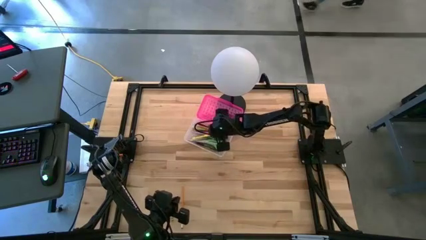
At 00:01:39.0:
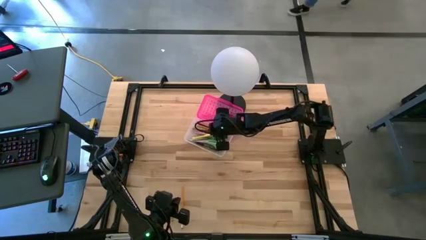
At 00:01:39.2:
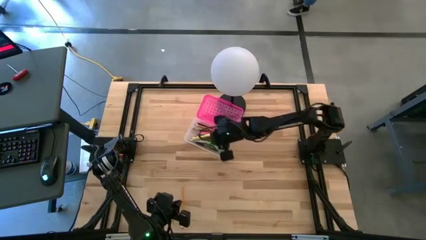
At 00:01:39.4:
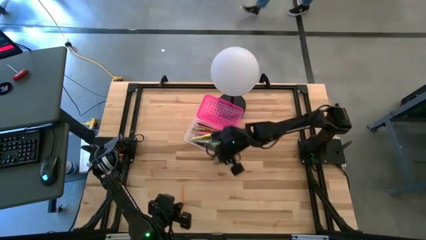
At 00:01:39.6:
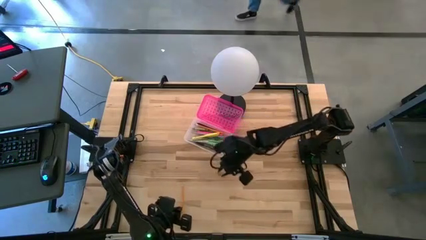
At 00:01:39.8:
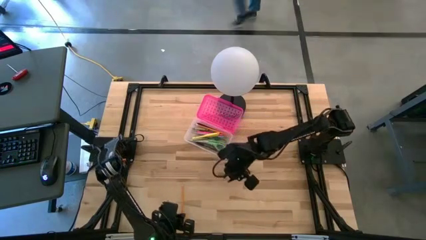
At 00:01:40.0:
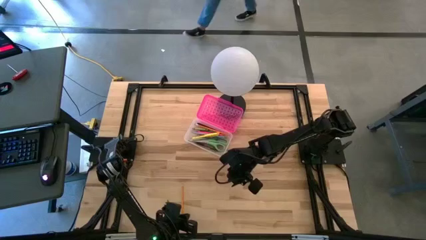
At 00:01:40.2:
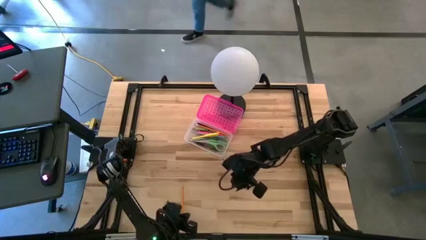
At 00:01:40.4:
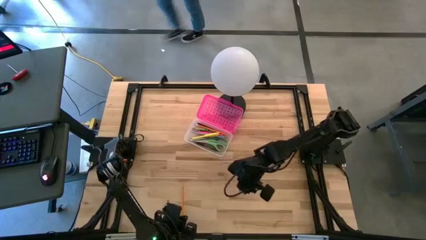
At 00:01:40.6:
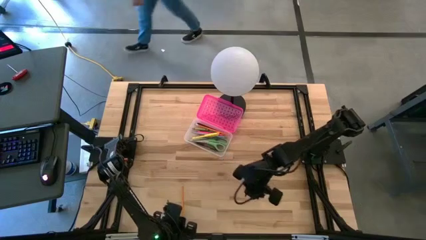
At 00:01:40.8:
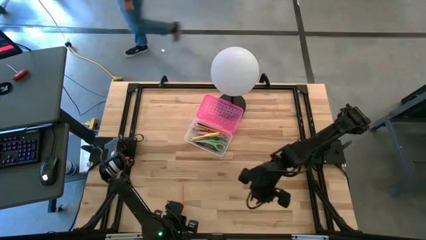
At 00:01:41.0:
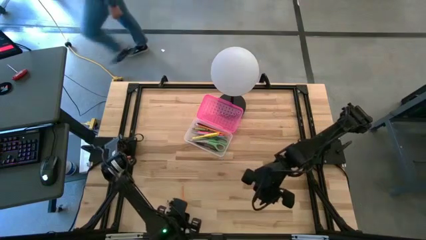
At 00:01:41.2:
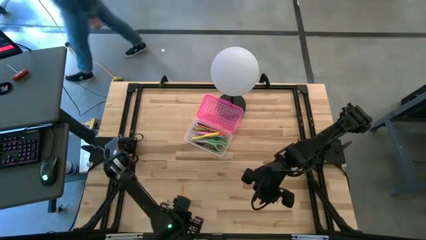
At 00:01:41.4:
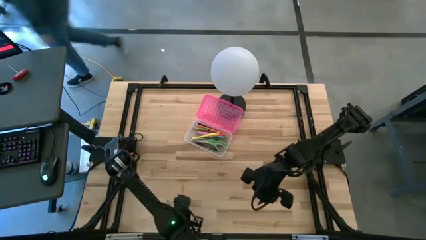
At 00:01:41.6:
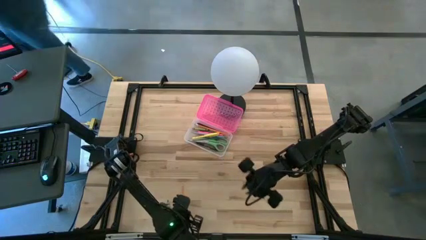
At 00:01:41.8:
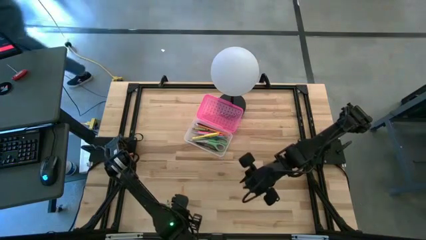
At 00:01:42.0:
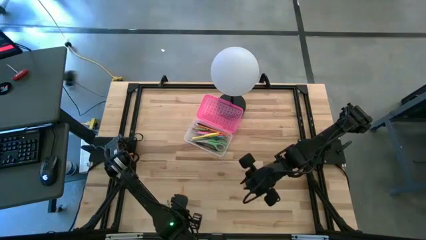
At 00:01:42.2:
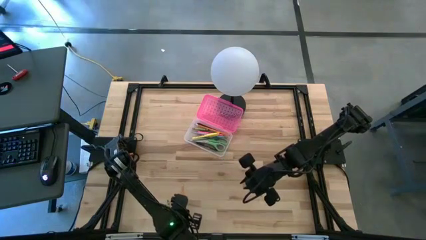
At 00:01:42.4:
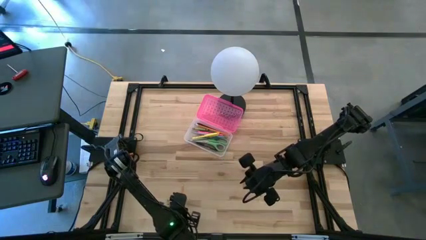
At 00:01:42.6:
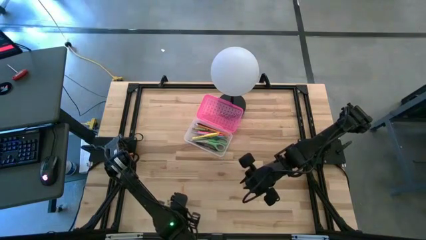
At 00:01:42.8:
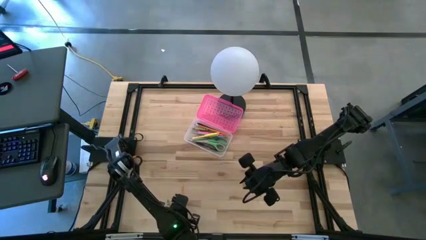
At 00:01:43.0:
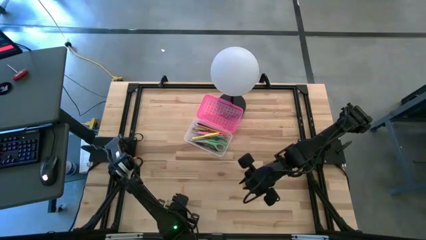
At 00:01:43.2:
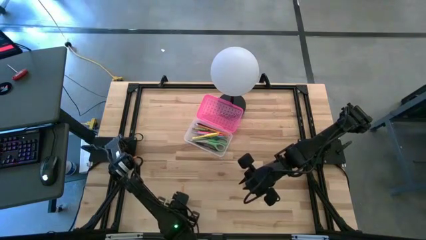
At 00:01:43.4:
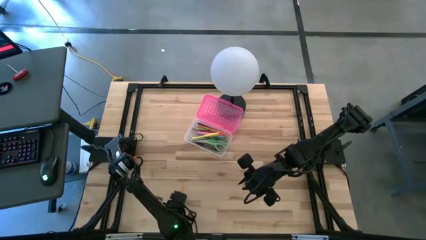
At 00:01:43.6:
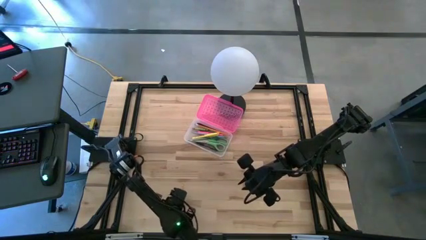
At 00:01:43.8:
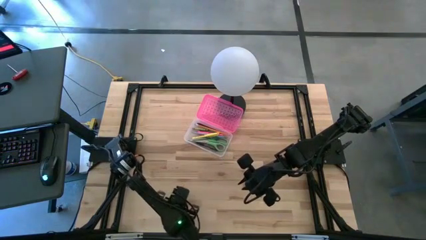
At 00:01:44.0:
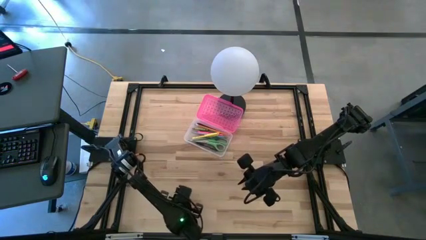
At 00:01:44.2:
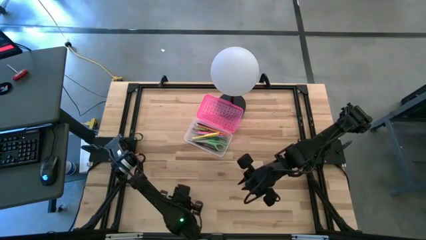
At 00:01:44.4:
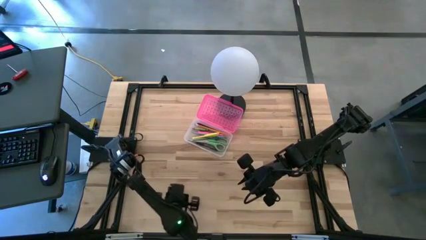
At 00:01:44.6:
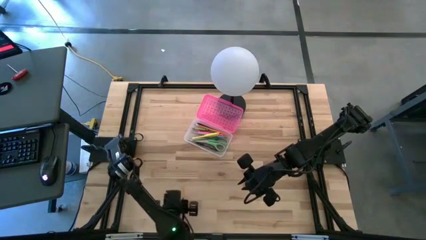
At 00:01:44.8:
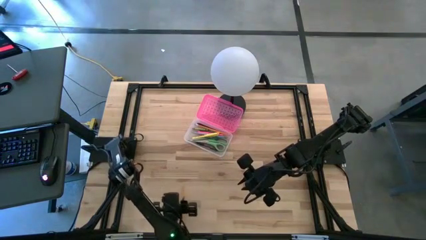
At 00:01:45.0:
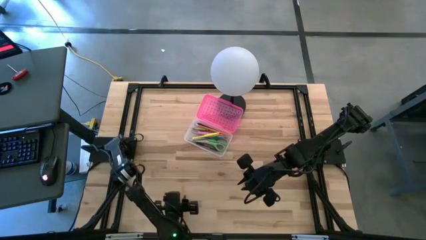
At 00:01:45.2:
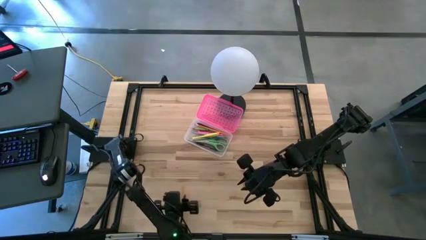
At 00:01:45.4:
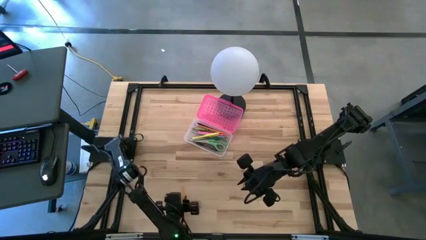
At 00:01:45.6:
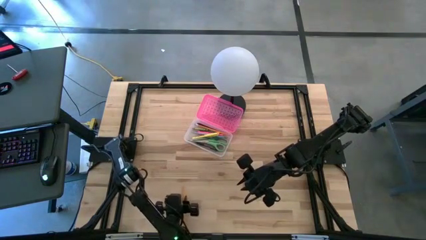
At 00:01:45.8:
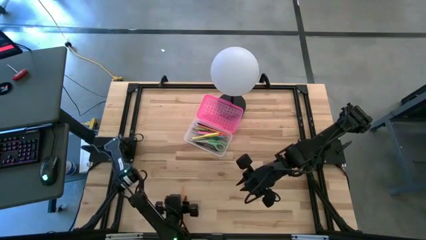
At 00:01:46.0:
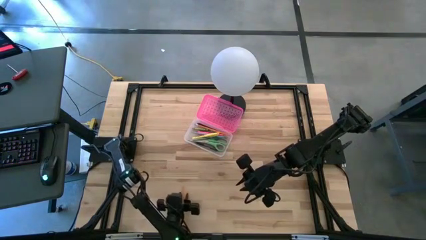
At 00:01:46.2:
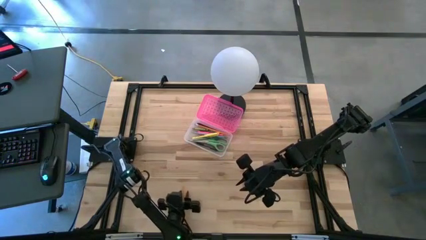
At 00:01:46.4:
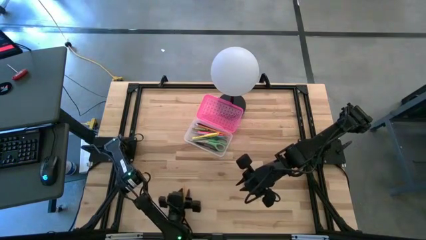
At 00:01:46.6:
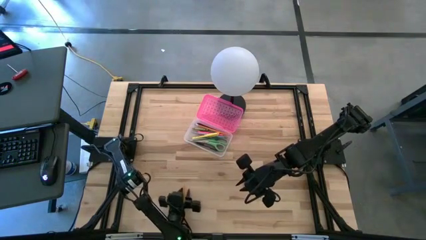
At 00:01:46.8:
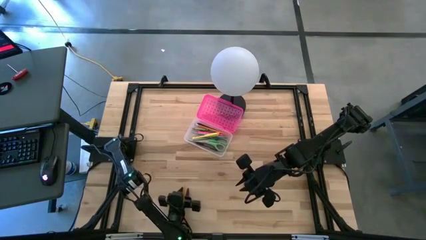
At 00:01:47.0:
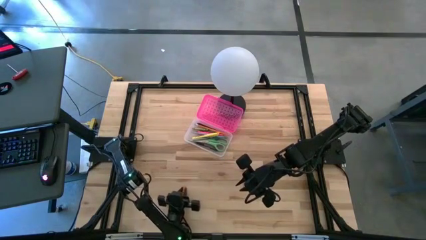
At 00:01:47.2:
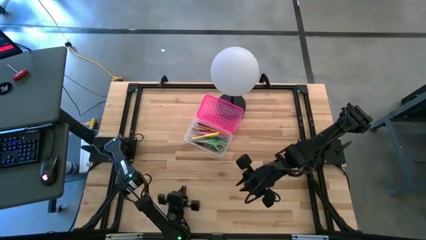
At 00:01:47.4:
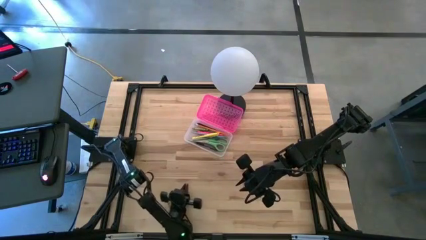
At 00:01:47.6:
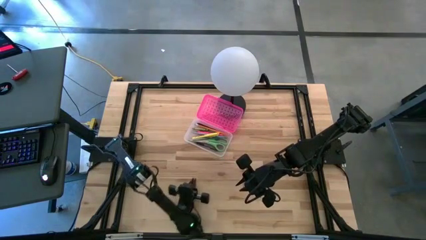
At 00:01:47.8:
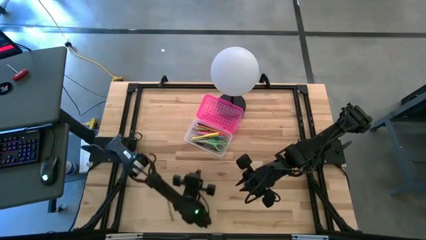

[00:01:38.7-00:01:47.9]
Task: Pick & place school supplies into a supply box
Put the orange pencil into the pink supply box

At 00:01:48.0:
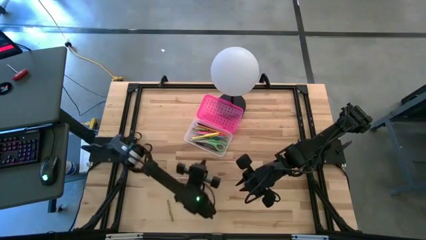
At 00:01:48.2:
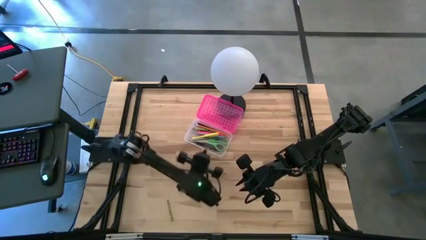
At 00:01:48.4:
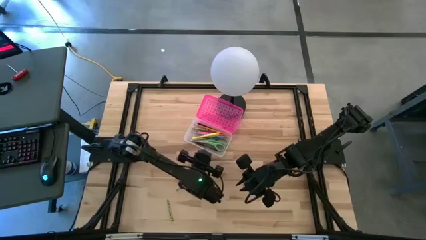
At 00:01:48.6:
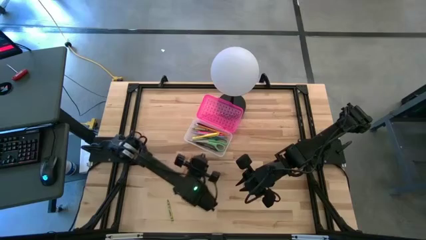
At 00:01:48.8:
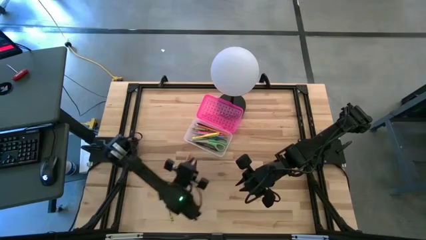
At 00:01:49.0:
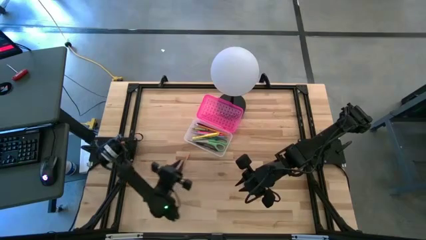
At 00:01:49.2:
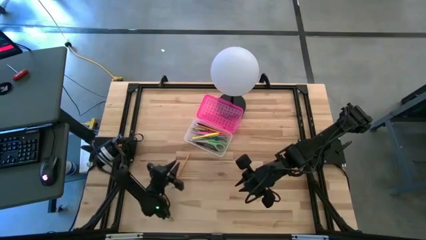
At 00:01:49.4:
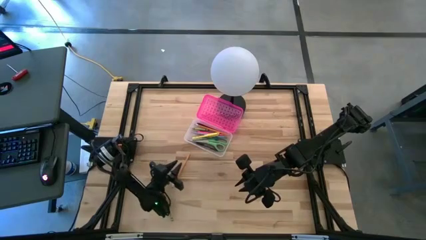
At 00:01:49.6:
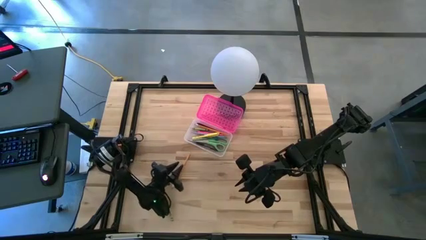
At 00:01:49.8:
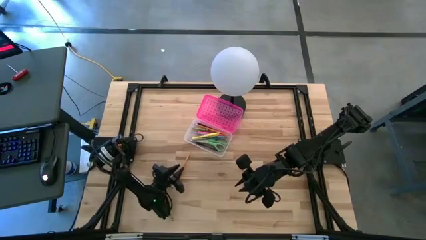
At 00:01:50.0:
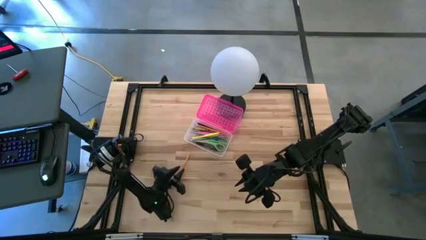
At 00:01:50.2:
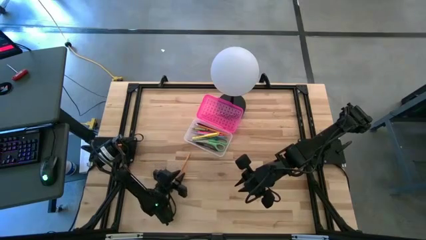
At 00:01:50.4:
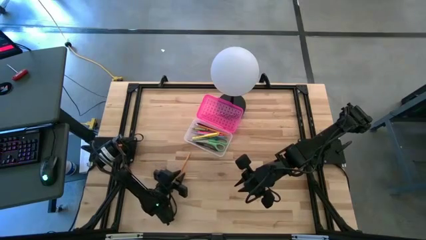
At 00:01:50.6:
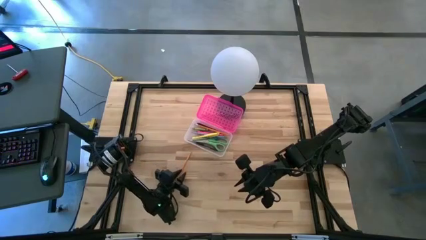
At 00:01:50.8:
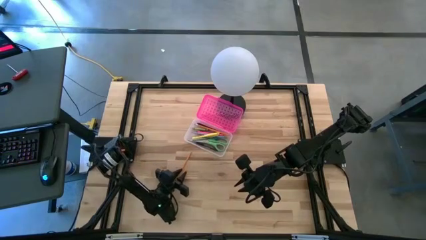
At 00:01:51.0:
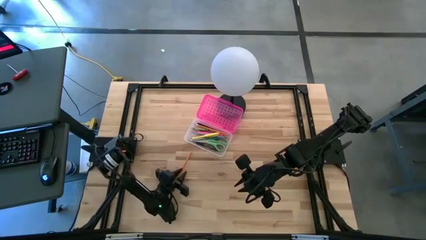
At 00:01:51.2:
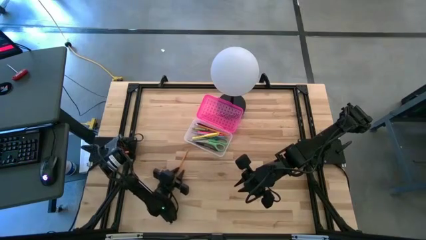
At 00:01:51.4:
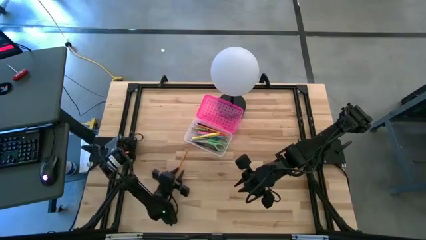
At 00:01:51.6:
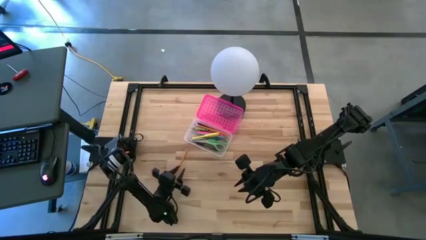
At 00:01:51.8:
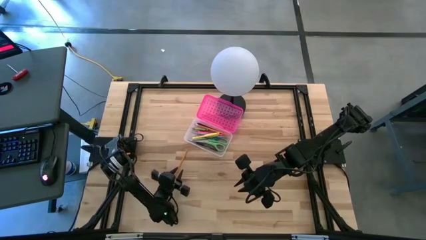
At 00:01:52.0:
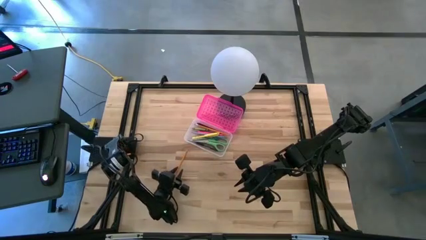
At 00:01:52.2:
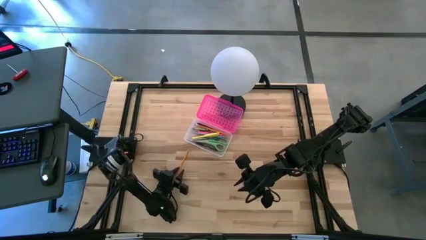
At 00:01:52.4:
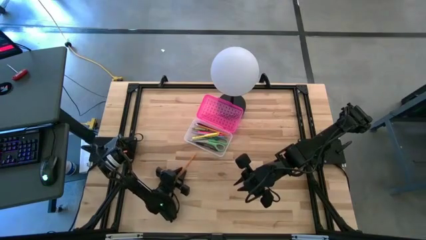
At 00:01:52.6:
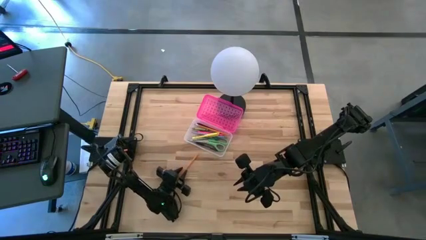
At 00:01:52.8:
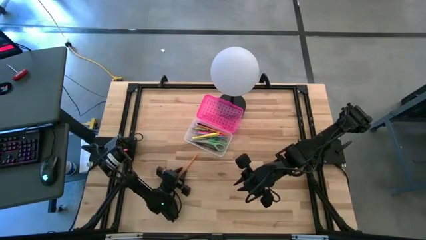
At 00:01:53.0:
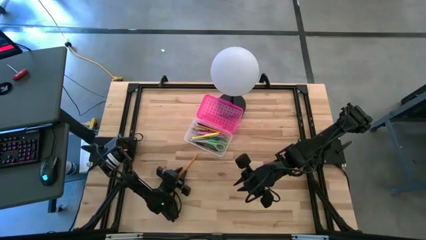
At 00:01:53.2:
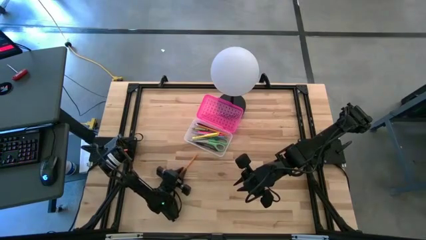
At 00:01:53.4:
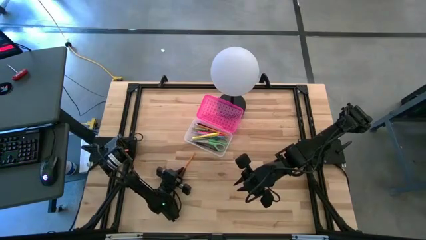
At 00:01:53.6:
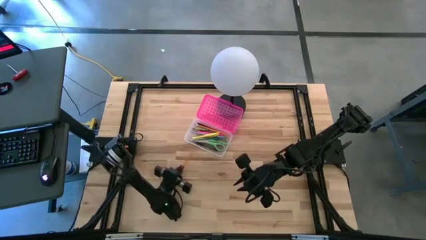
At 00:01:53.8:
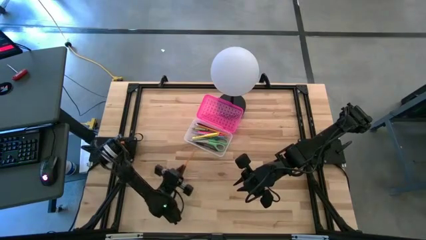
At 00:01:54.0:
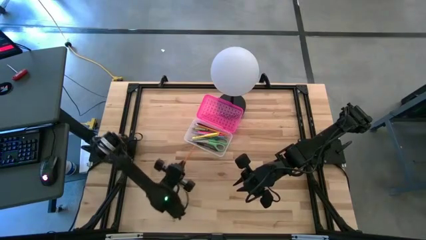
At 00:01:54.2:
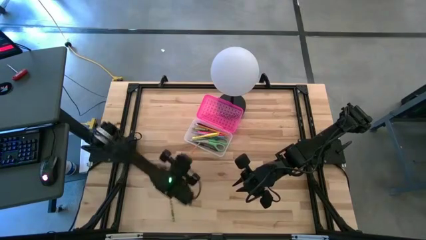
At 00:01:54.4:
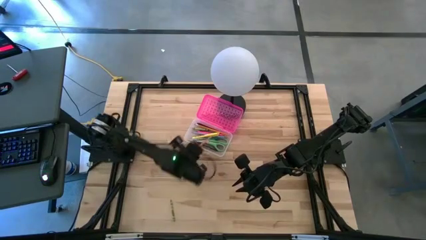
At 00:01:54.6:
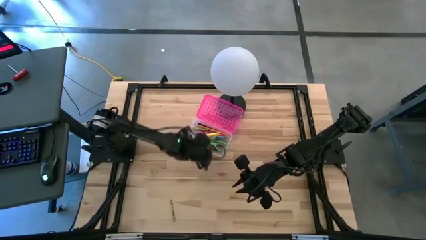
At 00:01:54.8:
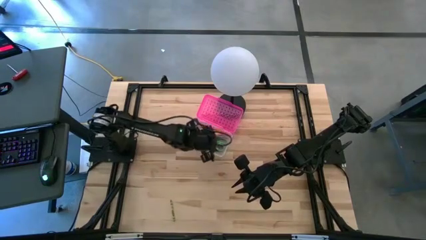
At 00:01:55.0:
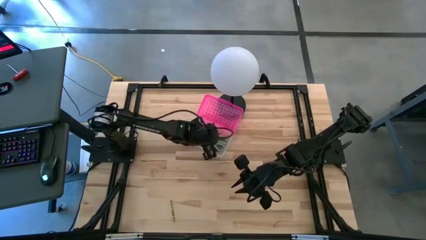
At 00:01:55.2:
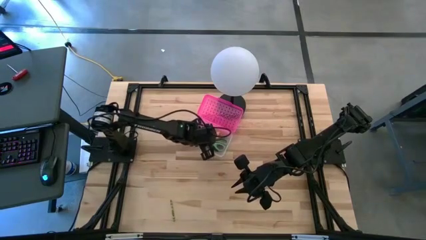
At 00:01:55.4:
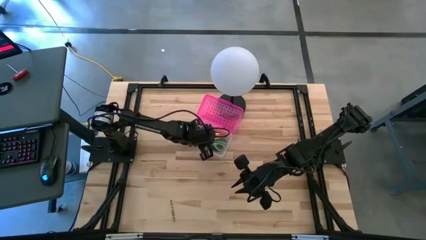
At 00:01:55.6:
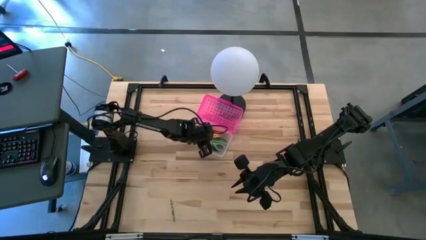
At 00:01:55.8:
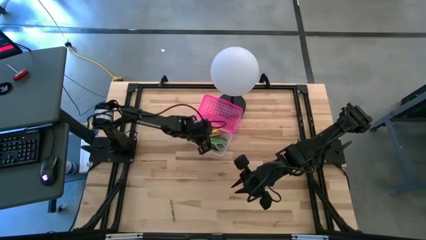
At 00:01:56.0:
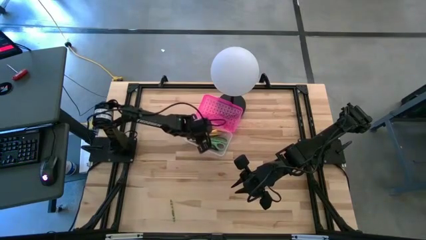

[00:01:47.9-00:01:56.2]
Put the orange pencil into the pink supply box
